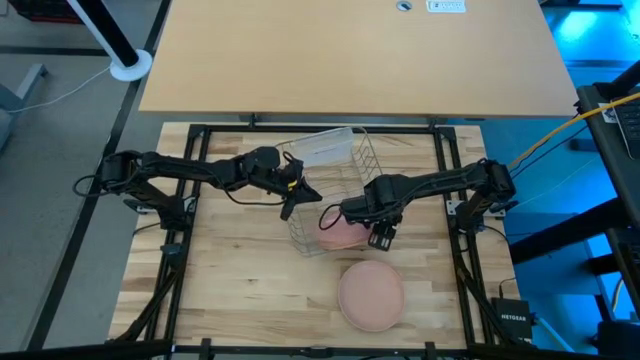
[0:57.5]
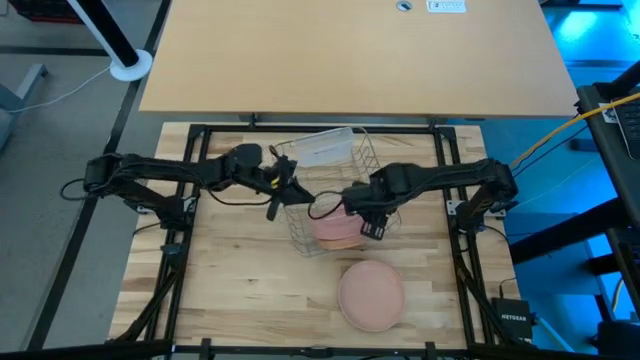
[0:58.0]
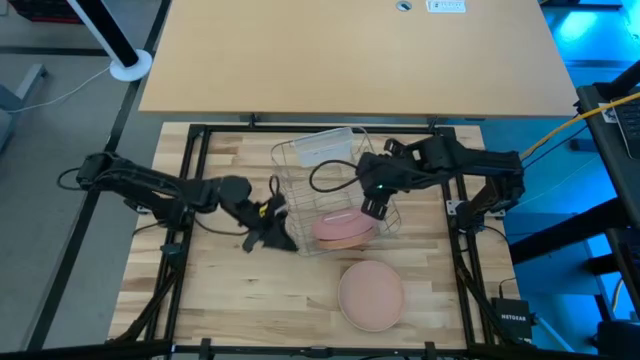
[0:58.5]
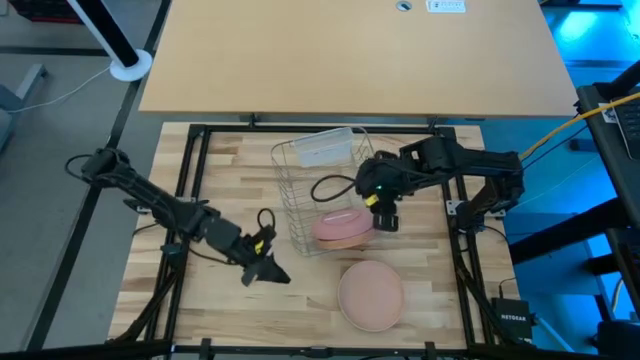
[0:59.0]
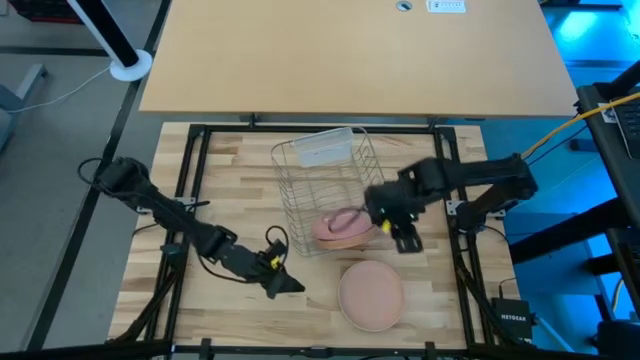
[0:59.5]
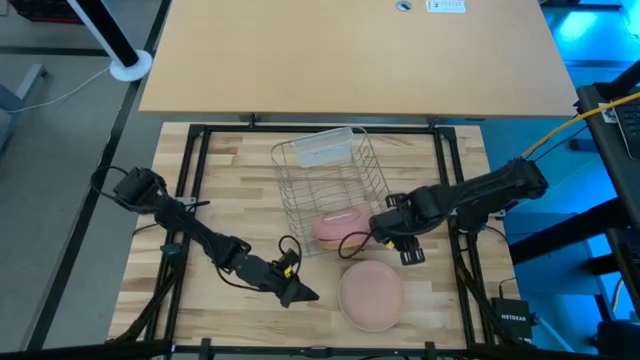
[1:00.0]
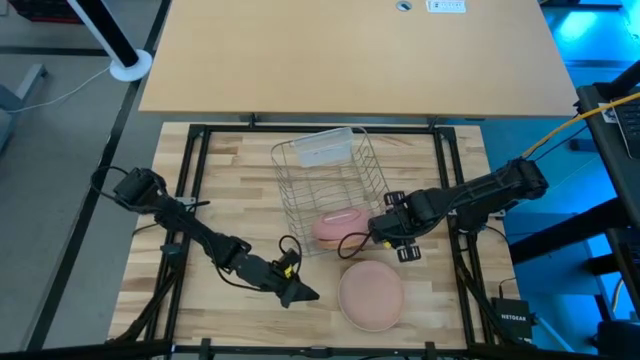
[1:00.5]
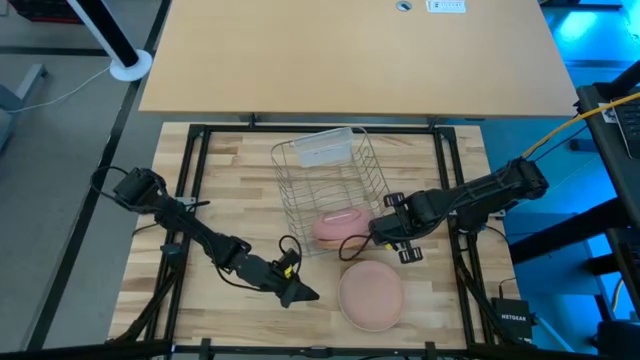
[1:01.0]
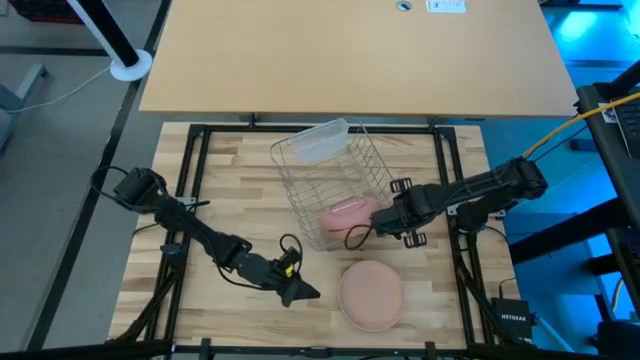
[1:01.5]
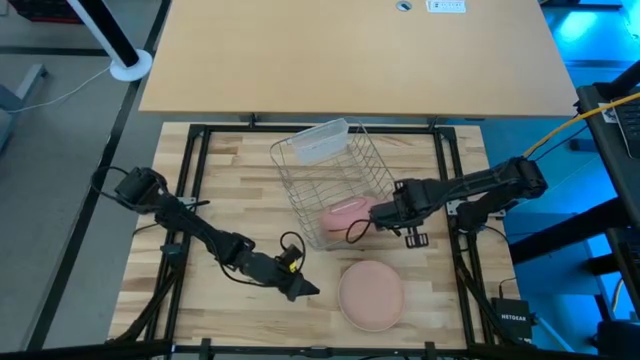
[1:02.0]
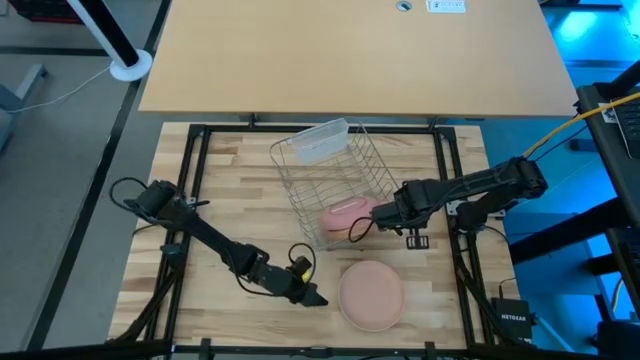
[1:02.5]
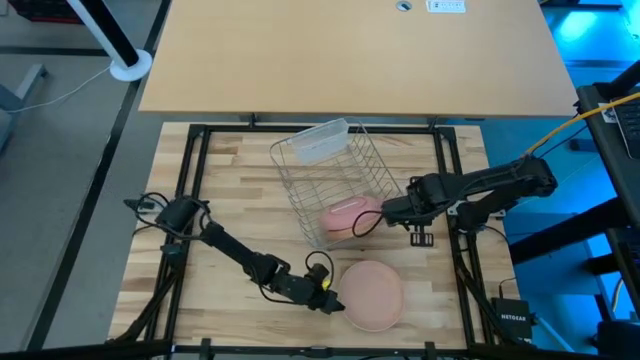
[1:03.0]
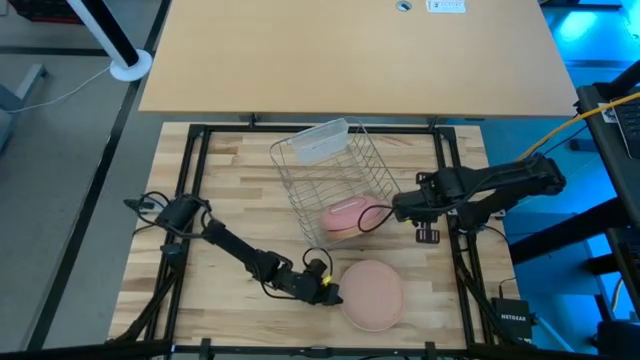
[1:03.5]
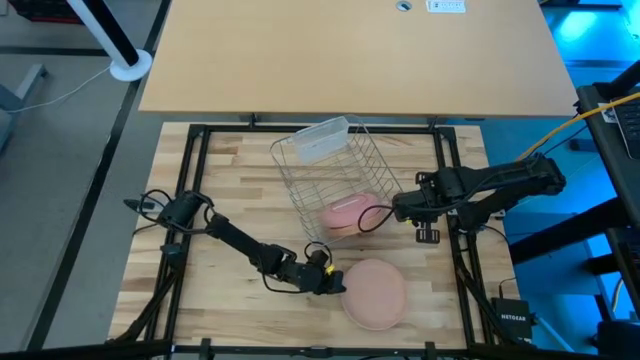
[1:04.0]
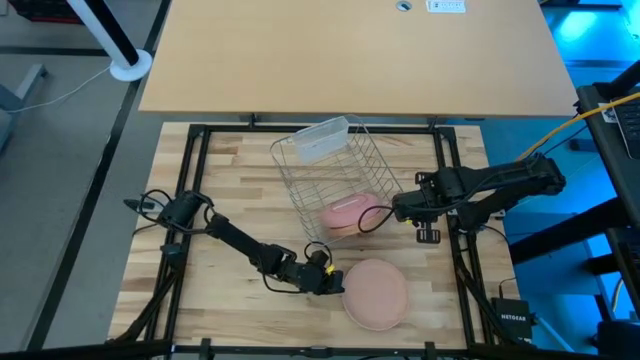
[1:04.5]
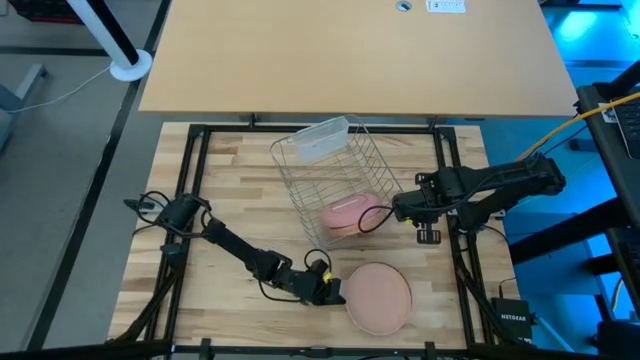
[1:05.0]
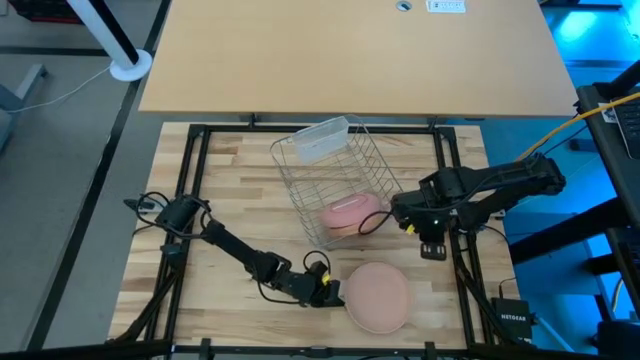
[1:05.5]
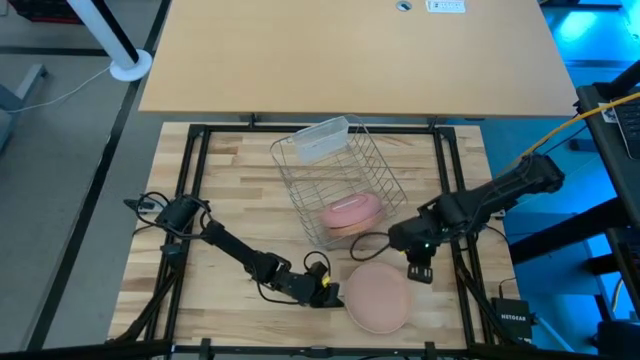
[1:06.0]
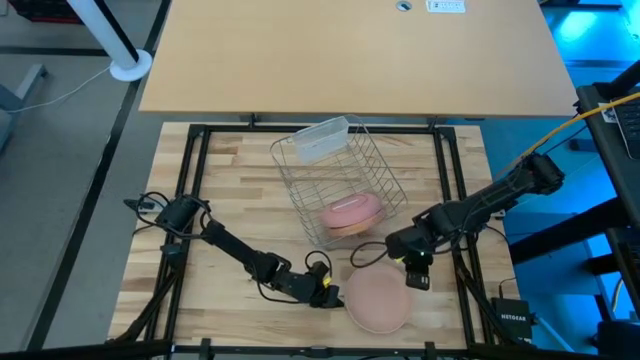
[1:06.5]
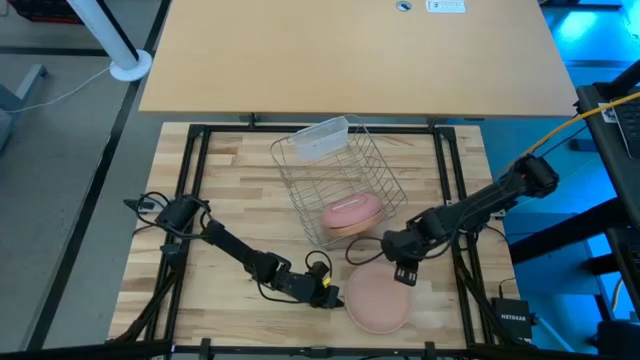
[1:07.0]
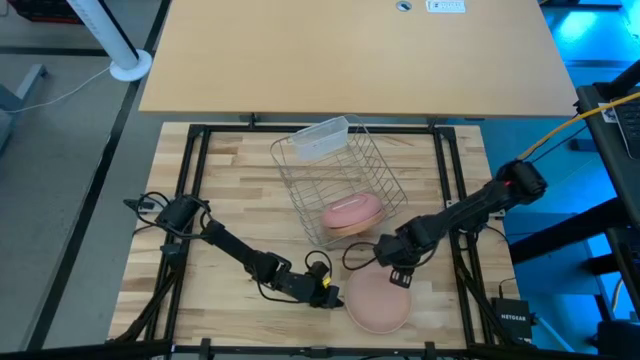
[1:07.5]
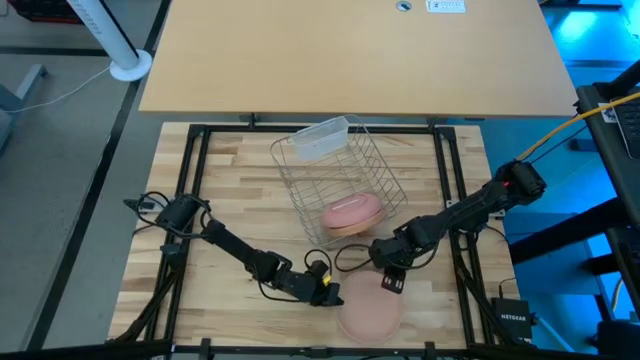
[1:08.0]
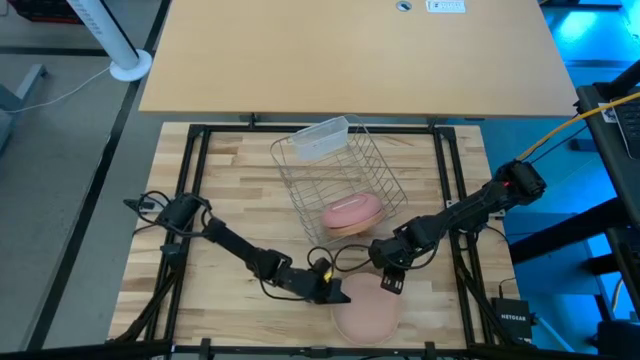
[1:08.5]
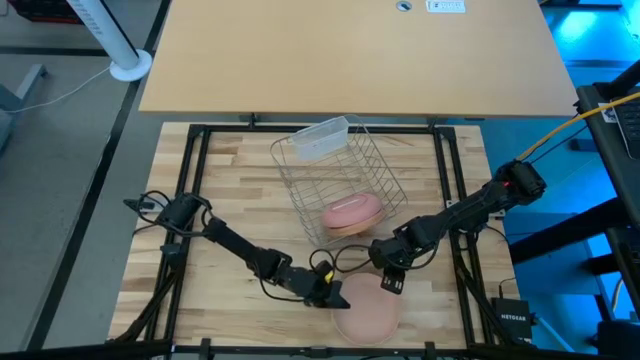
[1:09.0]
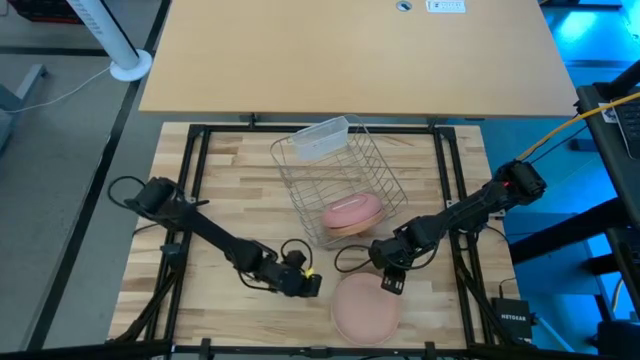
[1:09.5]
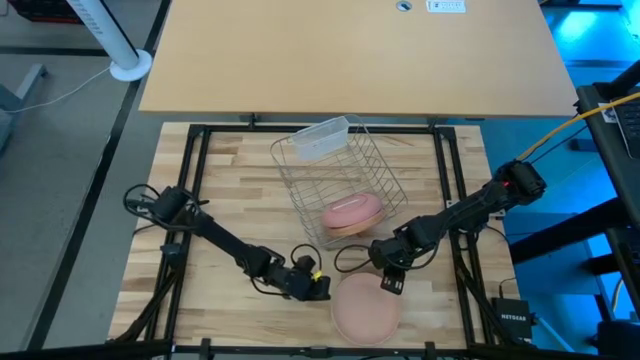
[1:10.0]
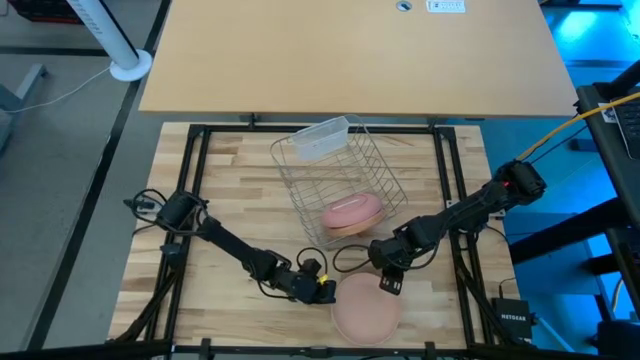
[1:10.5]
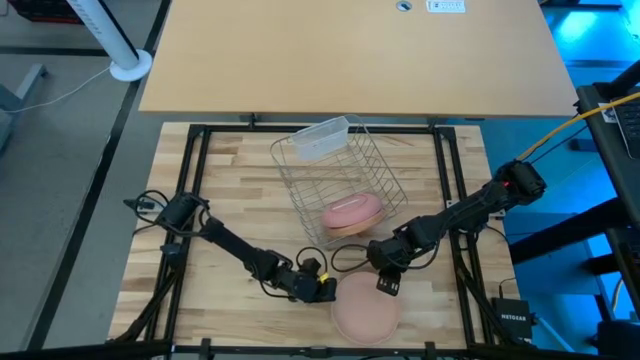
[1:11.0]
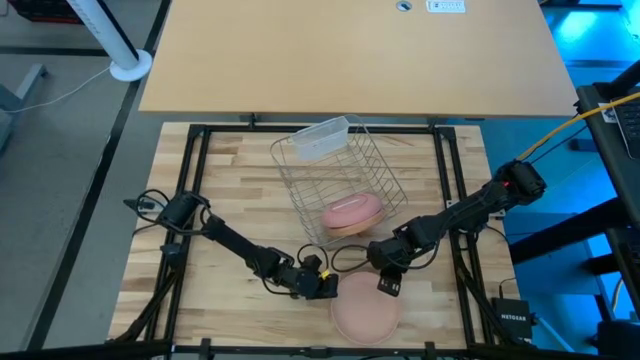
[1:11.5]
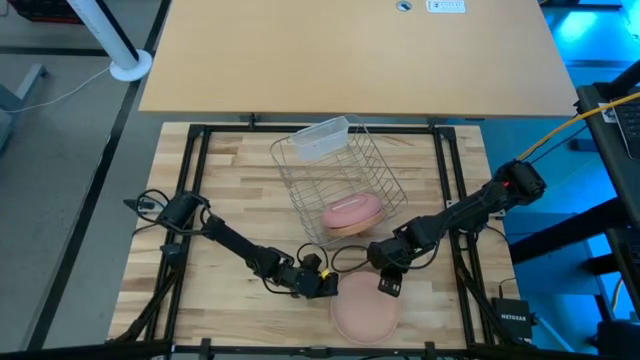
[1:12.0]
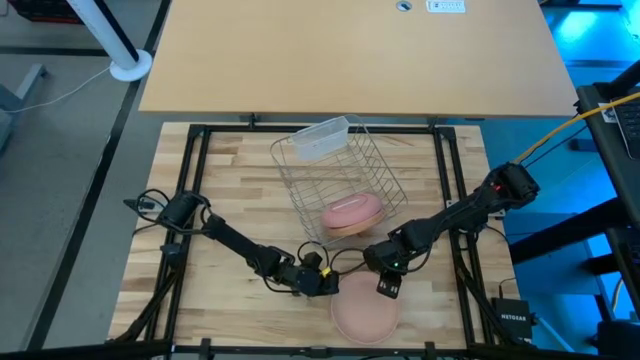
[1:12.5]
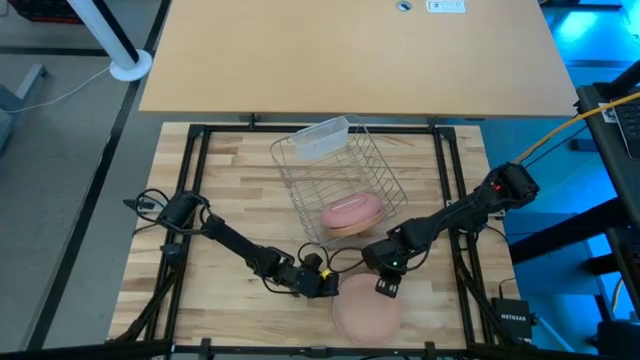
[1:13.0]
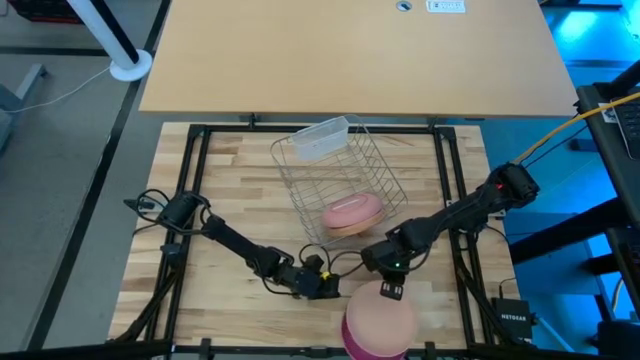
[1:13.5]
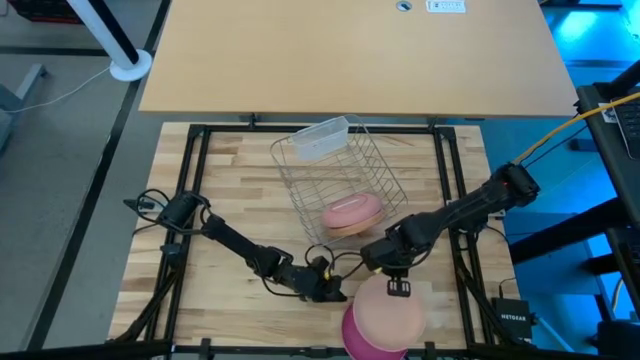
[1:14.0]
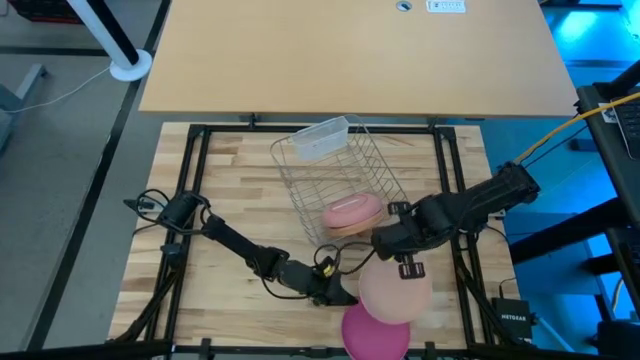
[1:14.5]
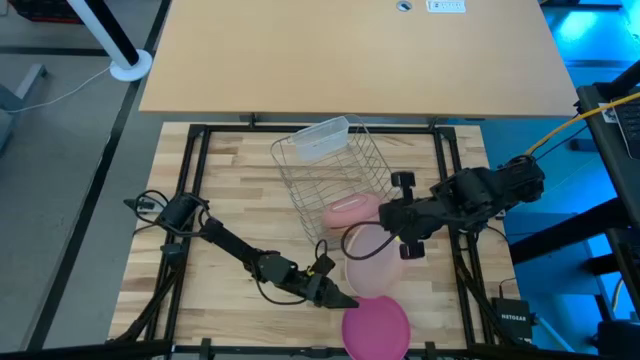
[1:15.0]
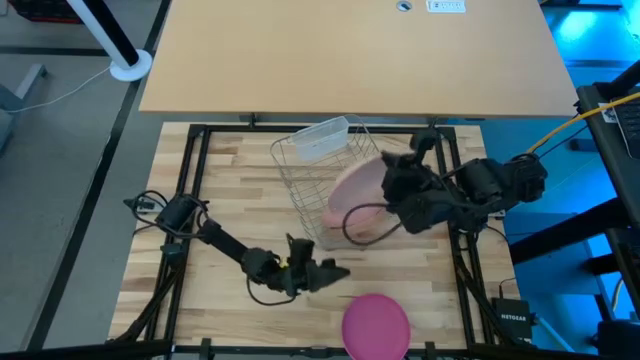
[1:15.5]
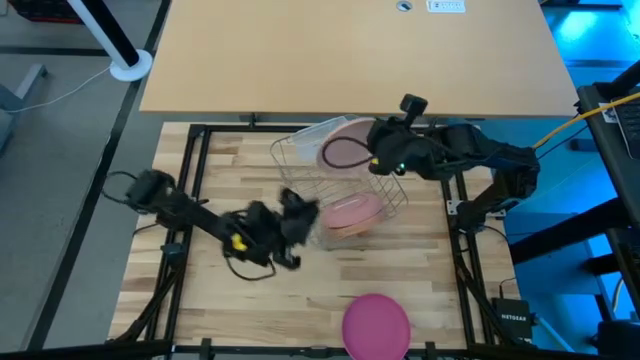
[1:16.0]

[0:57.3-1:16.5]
Task: Sort dishes
Put the light orange plate in the dish rack

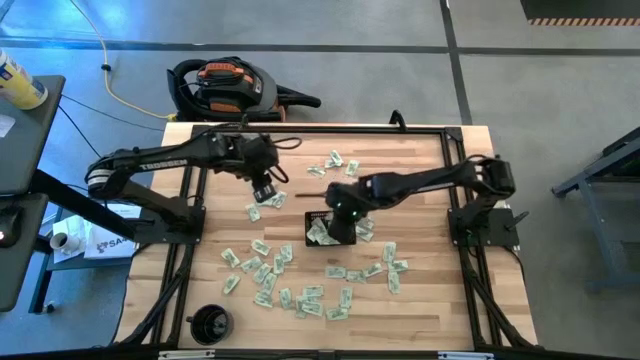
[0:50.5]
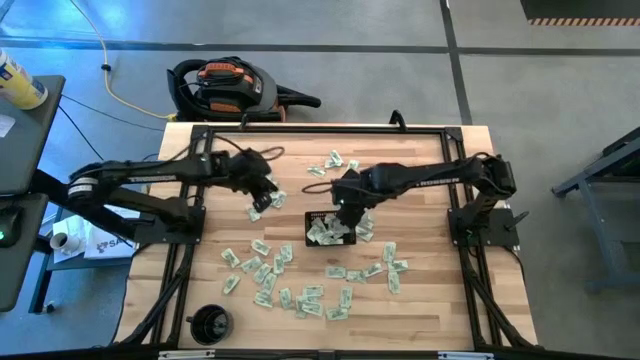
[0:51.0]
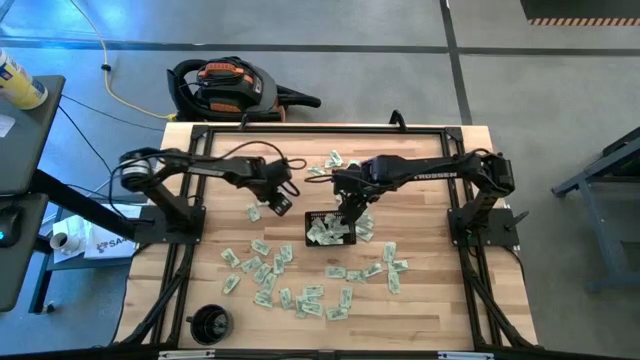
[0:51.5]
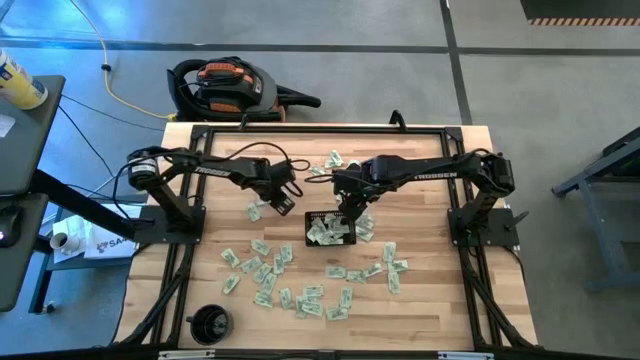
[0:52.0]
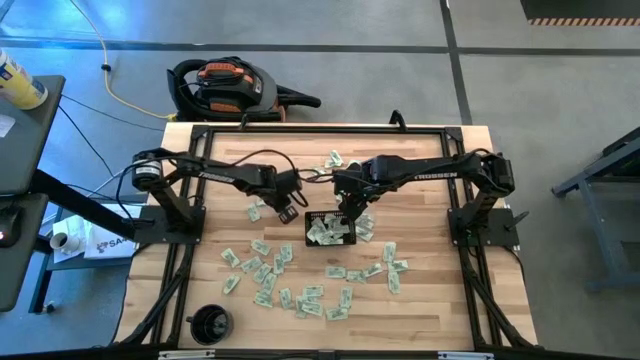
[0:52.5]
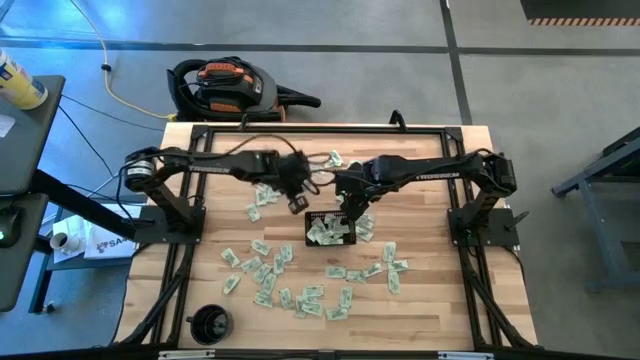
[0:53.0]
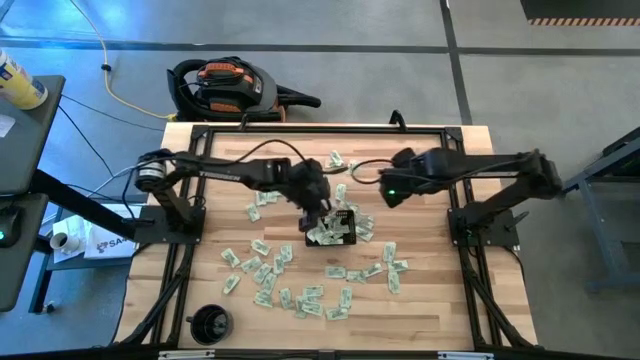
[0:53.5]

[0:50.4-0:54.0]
Task: Pick and place Stevia / Truvia into bins
Put the green stevia packet into the black basket

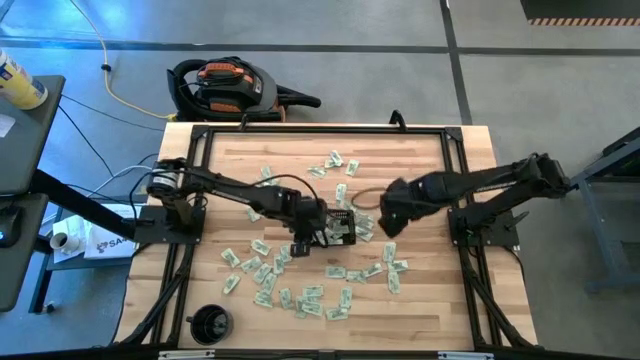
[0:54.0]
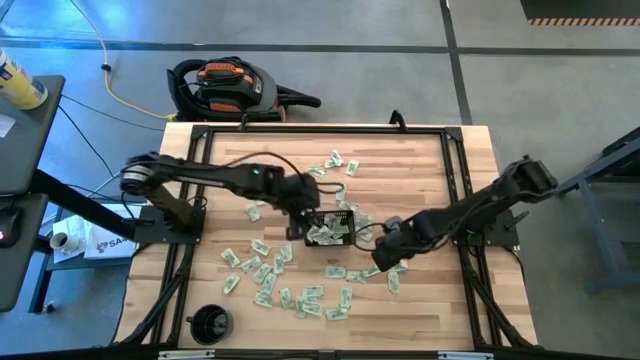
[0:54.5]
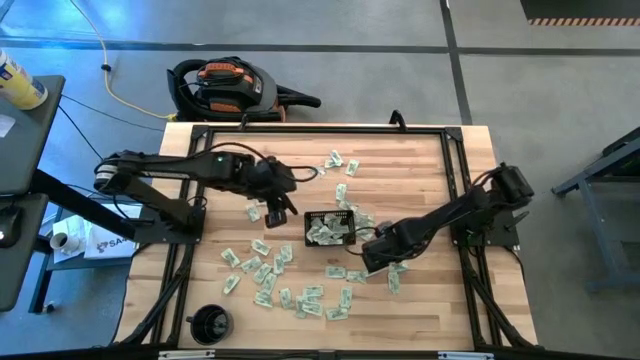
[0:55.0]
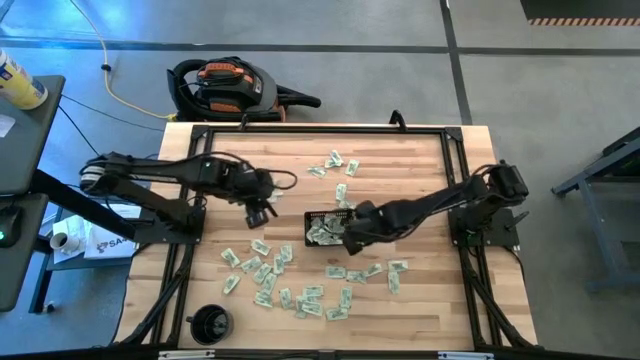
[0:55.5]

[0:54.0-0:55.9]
Put the green stevia packet into the black basket
